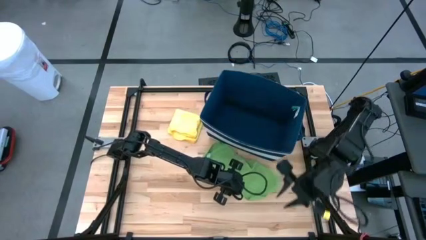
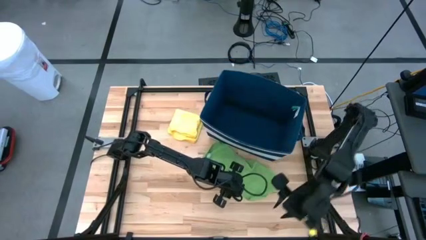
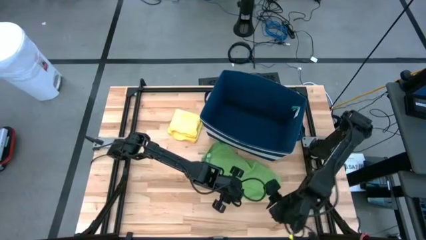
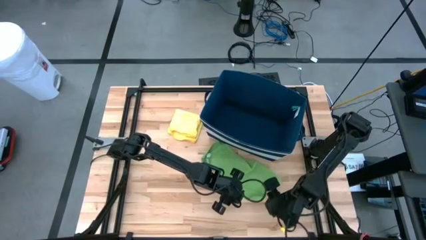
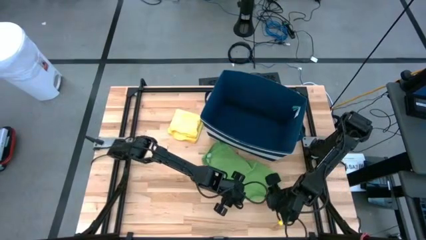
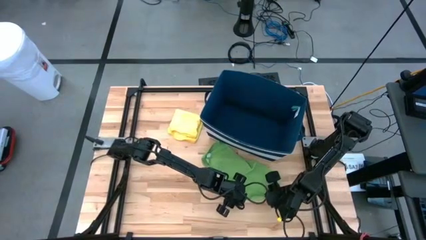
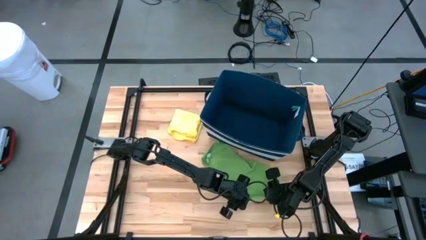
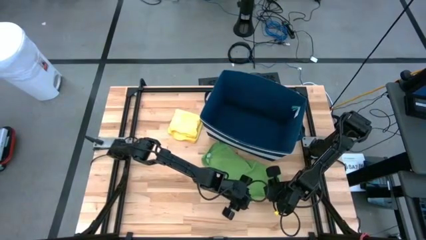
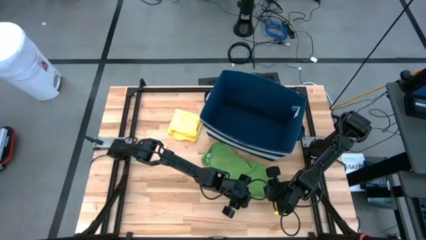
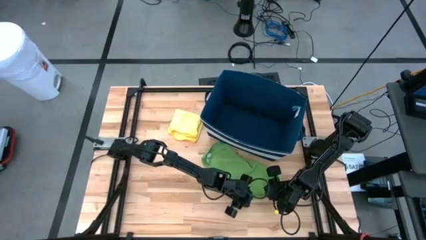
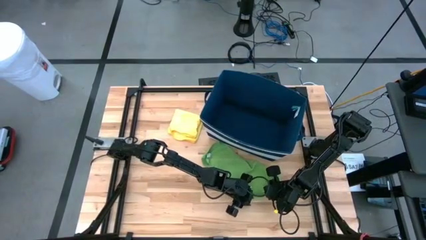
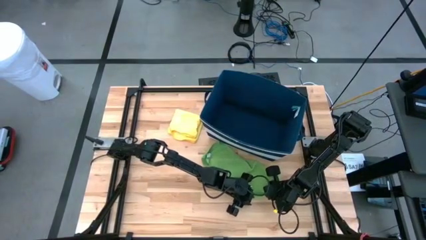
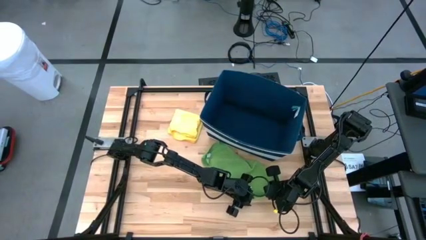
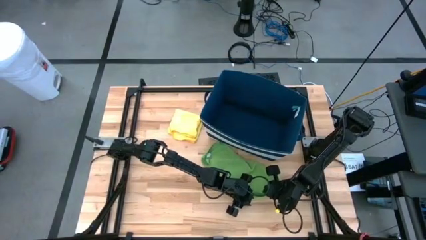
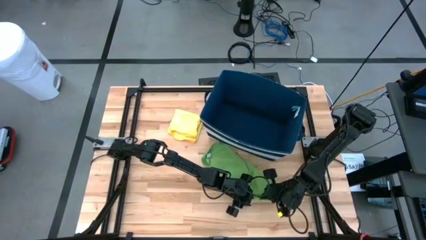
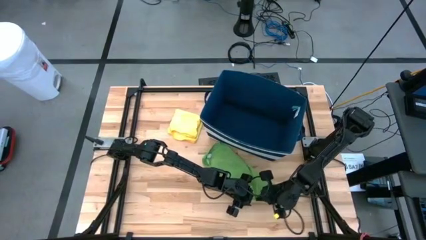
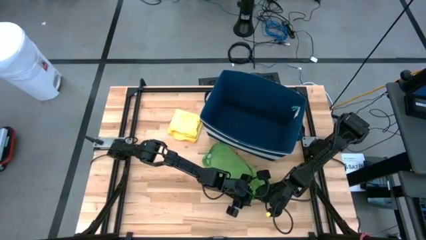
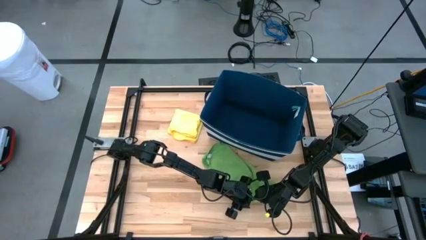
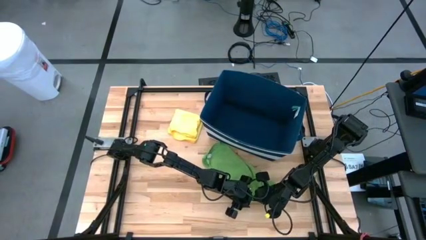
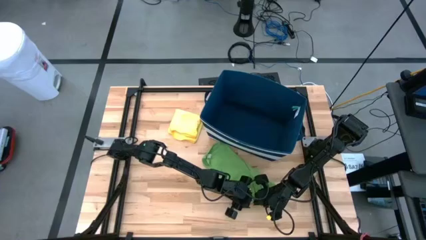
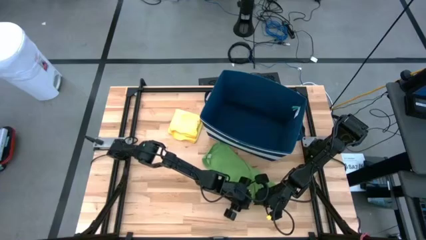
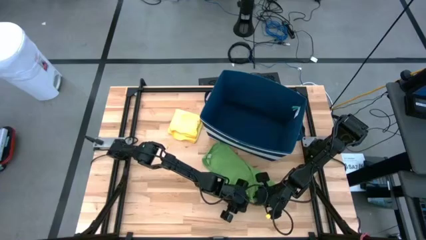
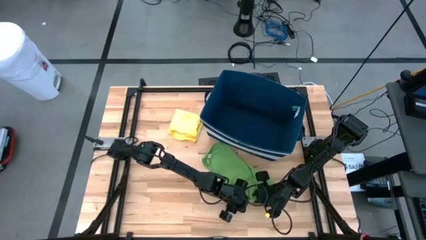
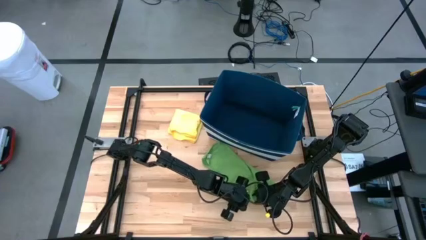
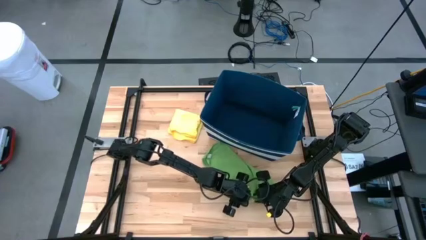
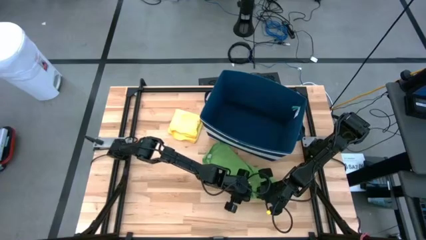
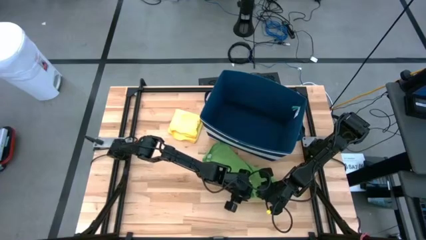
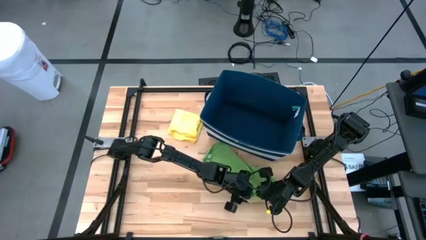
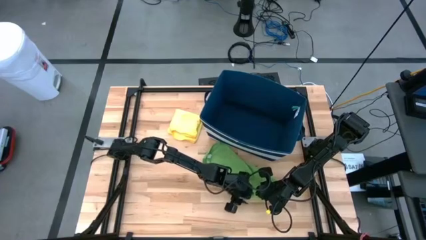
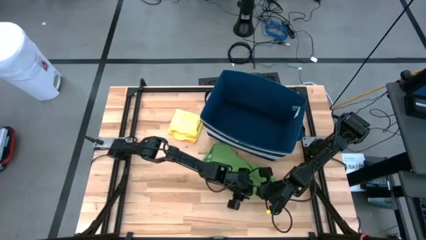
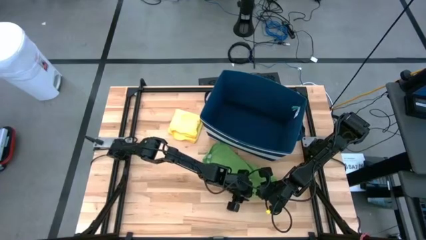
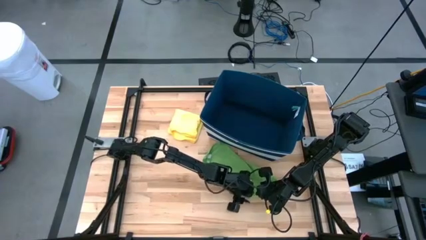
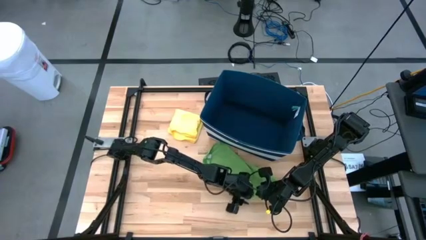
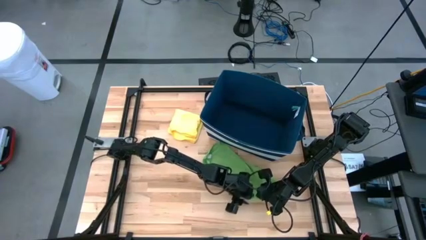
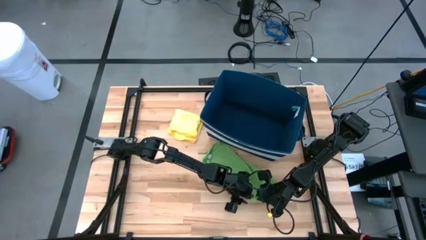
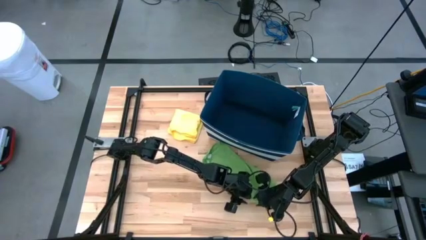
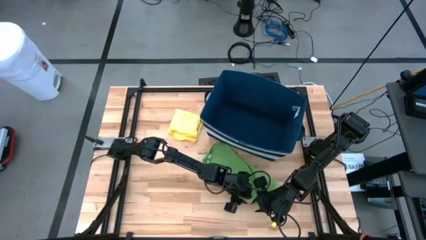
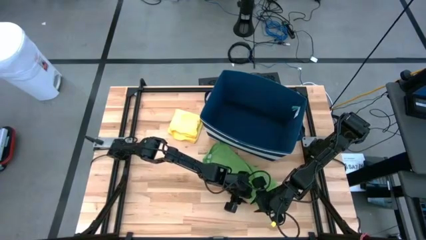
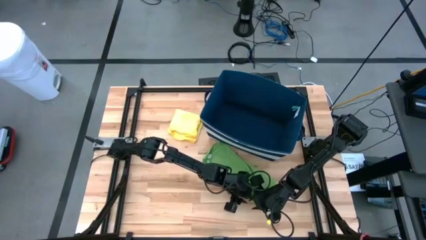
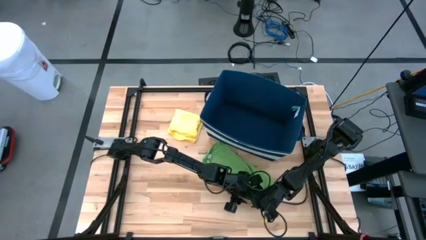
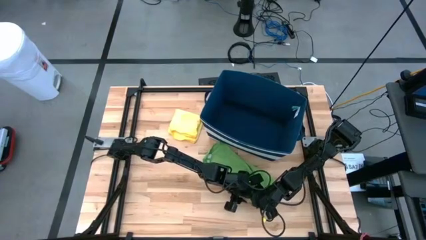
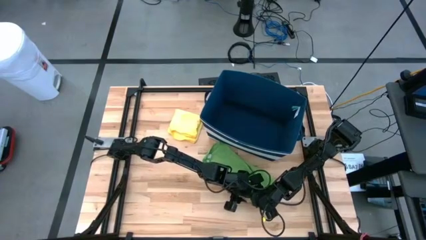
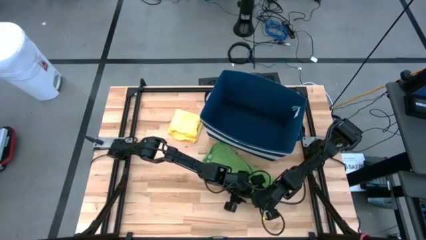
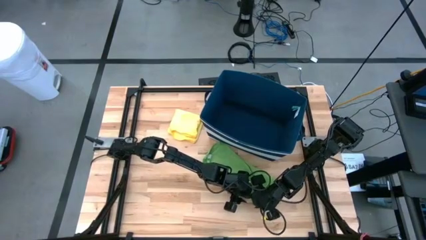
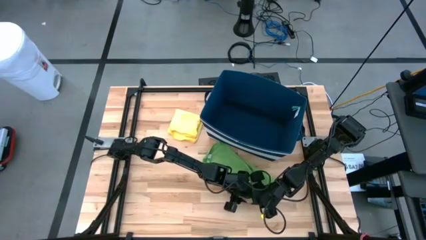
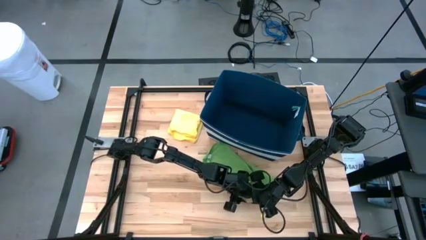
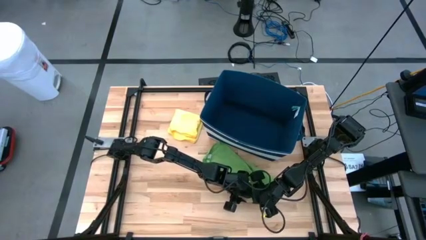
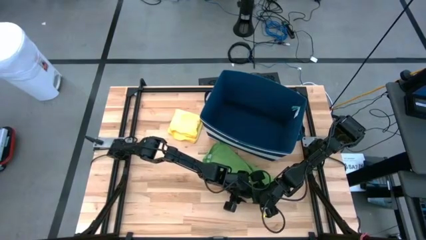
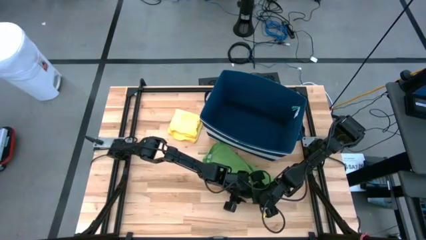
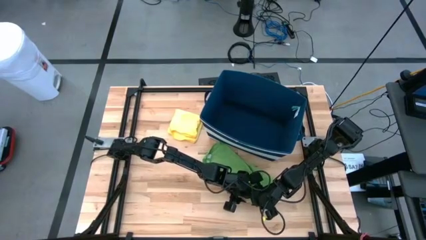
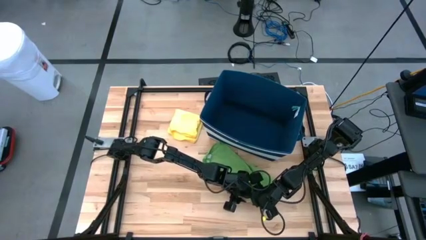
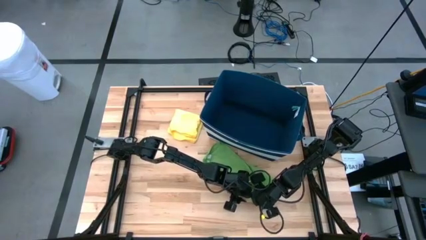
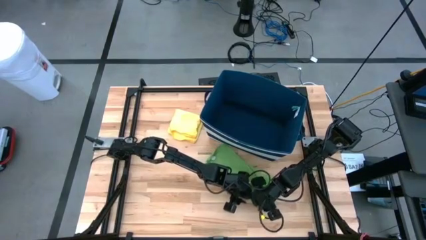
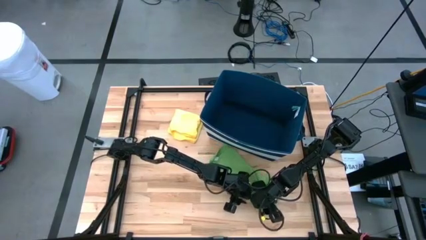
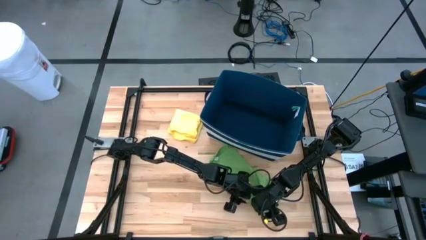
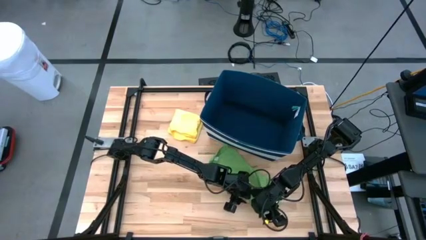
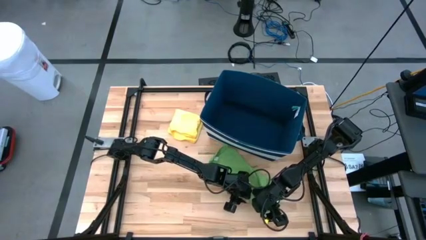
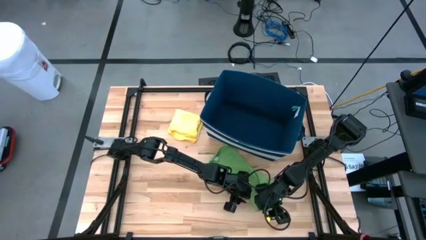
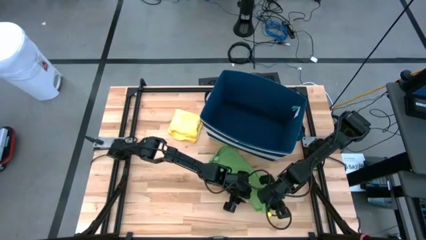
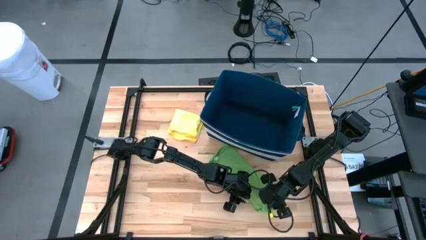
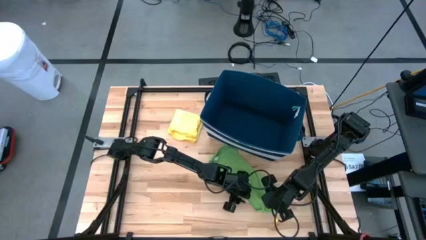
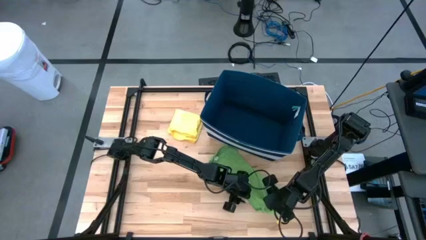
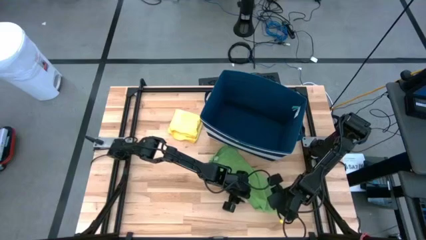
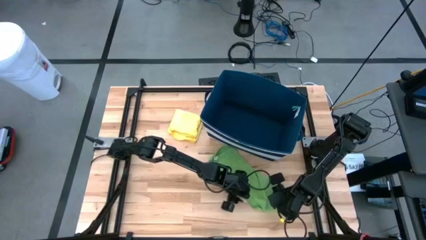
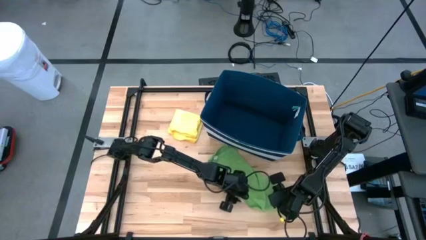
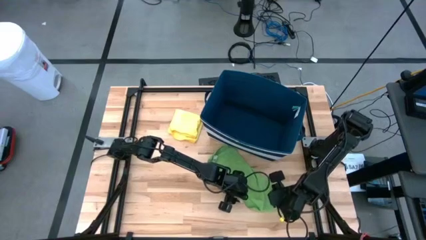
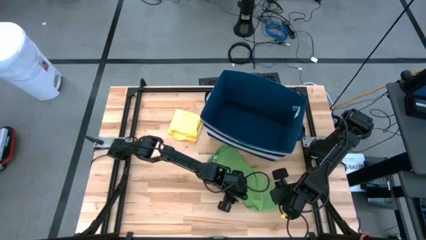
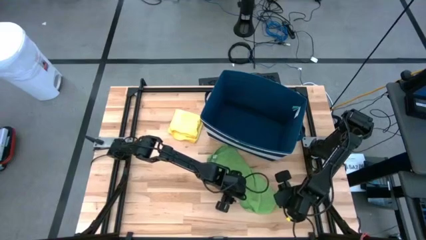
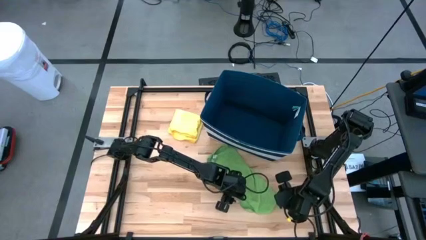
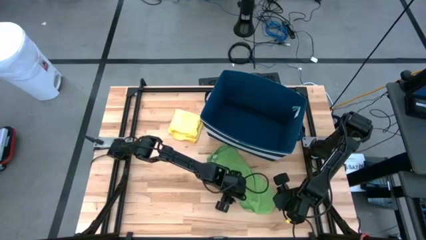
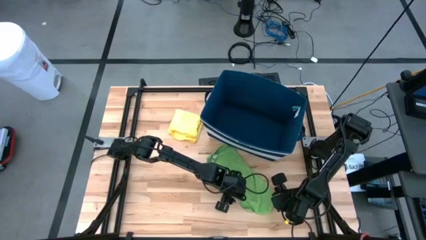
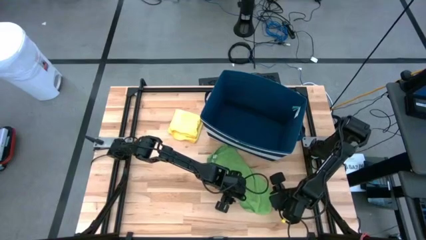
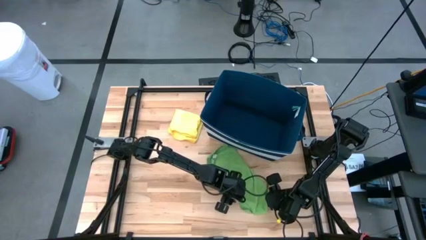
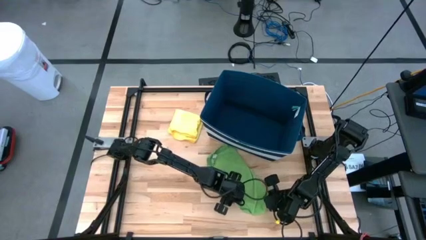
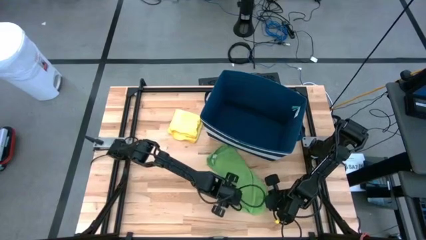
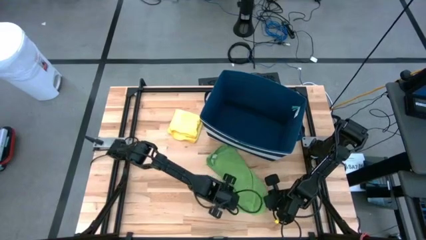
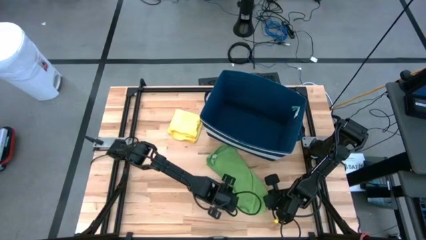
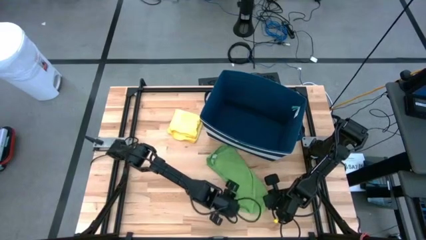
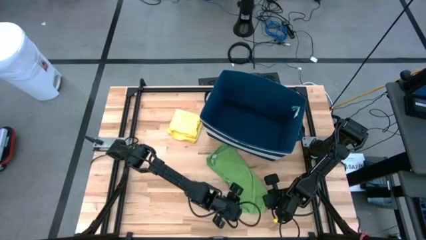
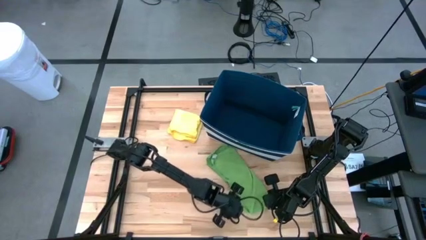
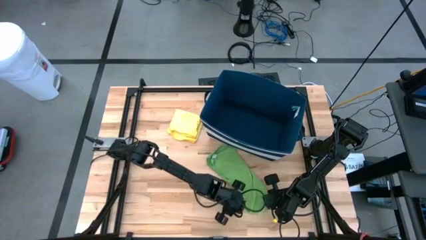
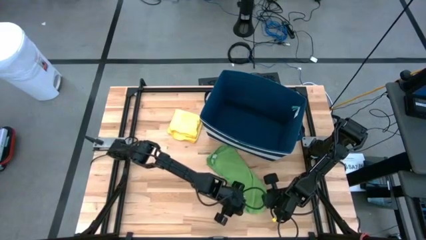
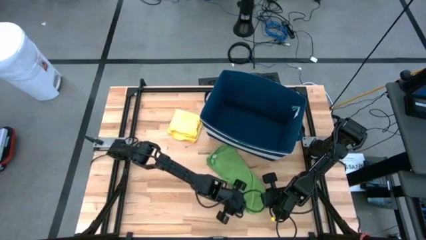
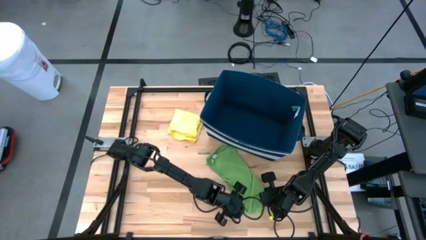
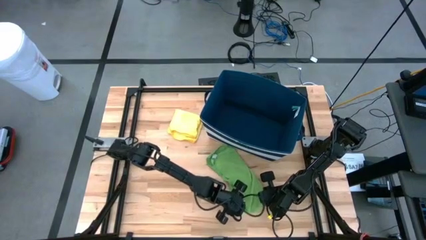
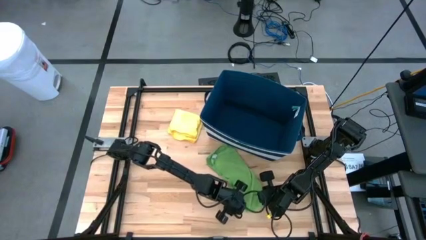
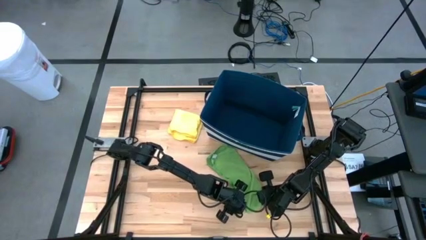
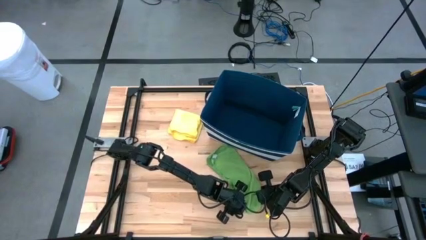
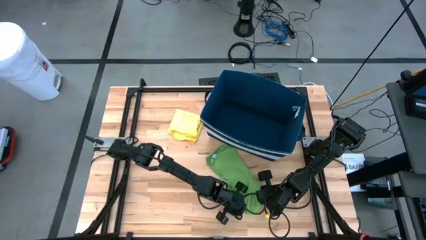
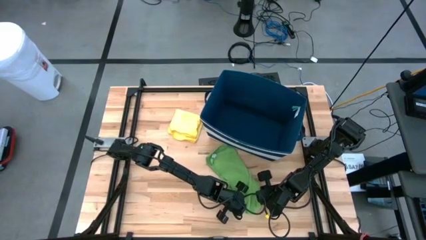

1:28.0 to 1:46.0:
Task: Fold towel
Fold the green towel
